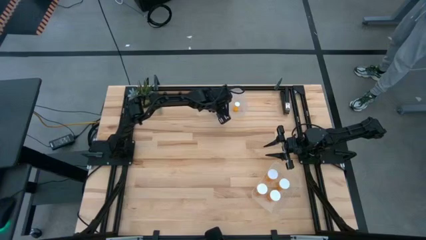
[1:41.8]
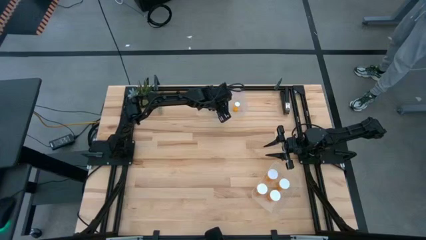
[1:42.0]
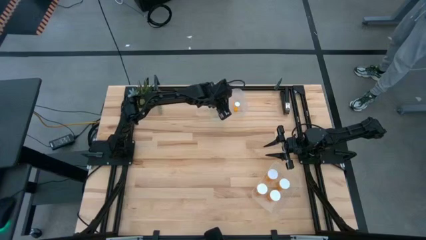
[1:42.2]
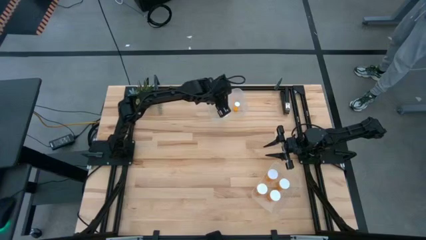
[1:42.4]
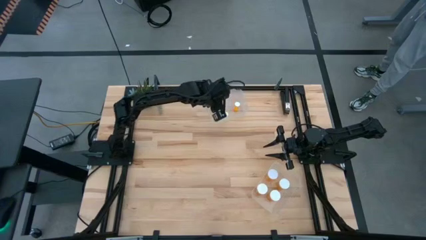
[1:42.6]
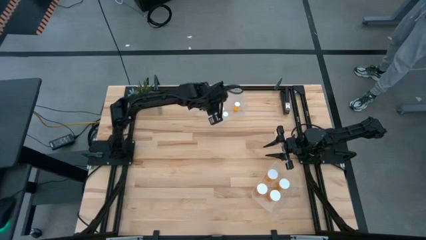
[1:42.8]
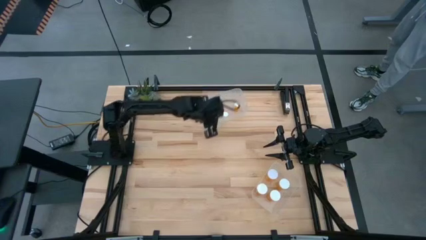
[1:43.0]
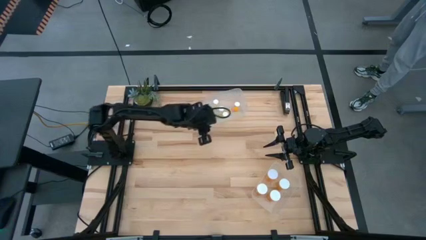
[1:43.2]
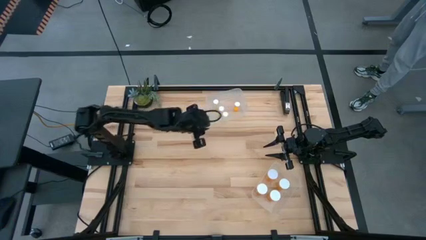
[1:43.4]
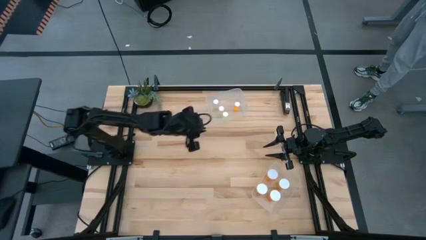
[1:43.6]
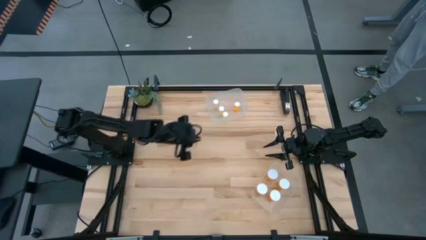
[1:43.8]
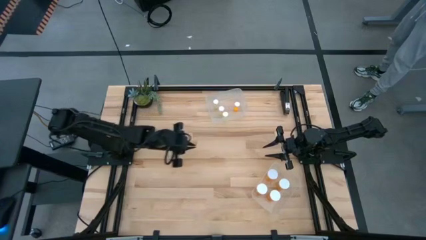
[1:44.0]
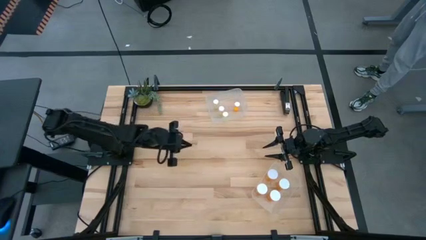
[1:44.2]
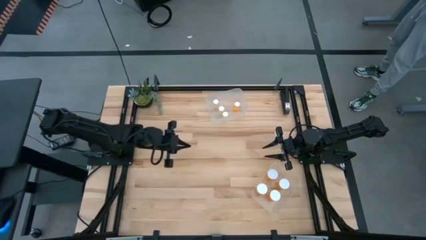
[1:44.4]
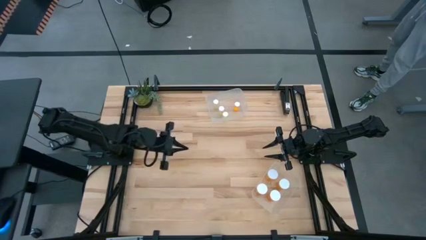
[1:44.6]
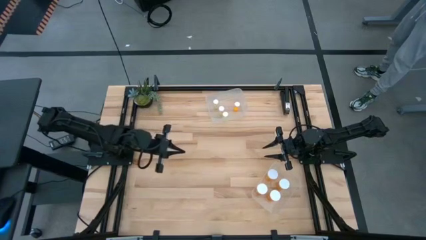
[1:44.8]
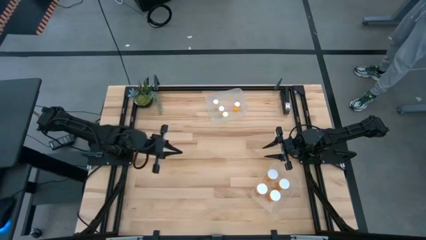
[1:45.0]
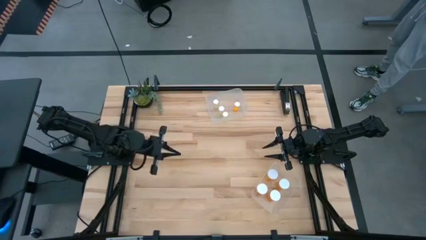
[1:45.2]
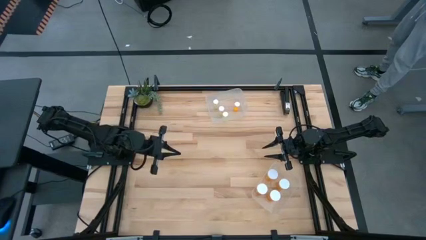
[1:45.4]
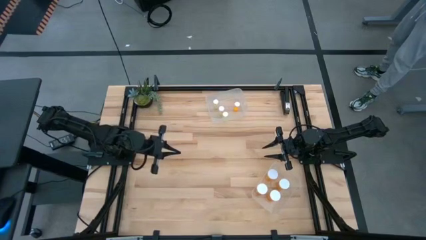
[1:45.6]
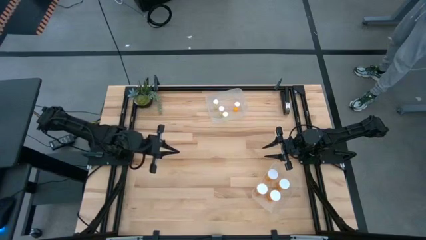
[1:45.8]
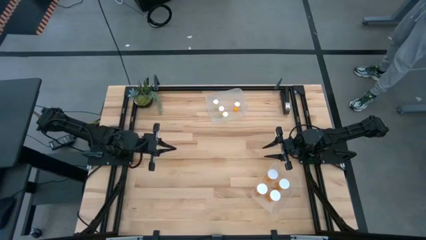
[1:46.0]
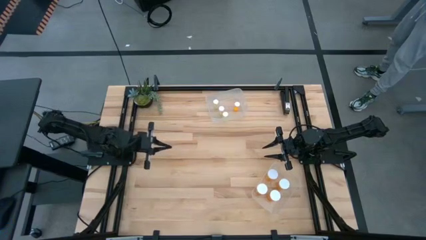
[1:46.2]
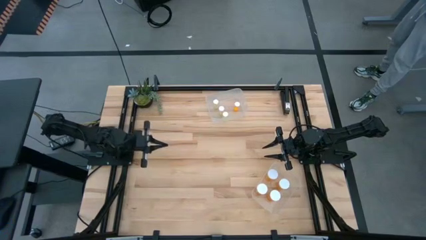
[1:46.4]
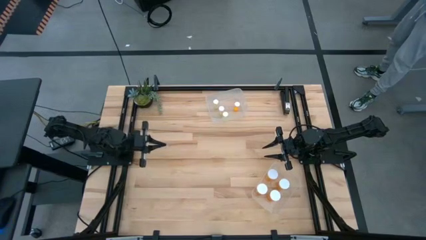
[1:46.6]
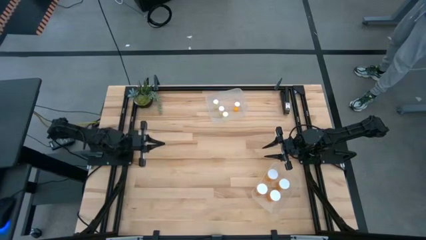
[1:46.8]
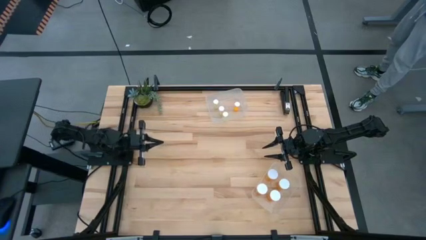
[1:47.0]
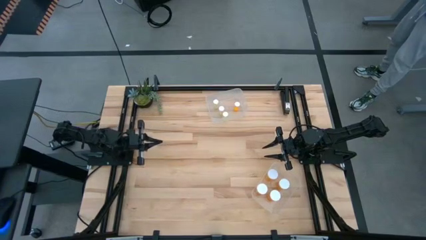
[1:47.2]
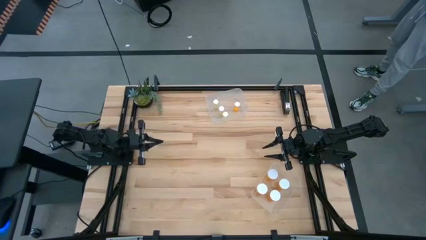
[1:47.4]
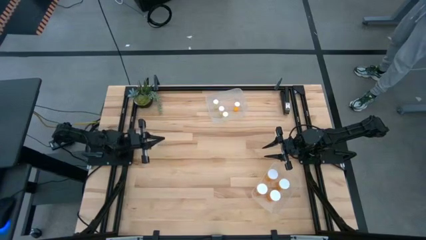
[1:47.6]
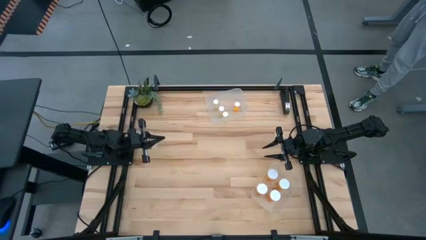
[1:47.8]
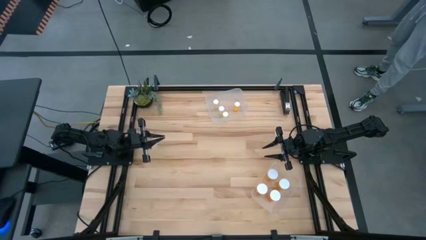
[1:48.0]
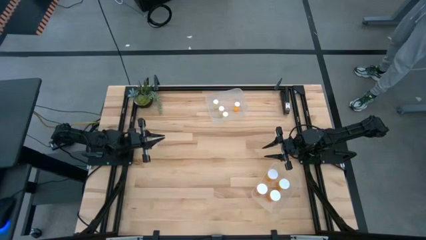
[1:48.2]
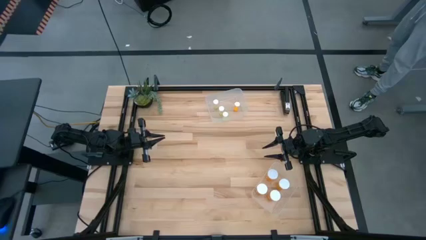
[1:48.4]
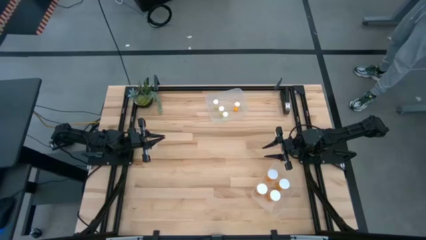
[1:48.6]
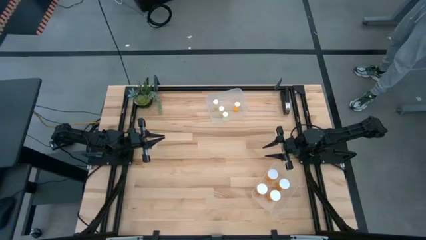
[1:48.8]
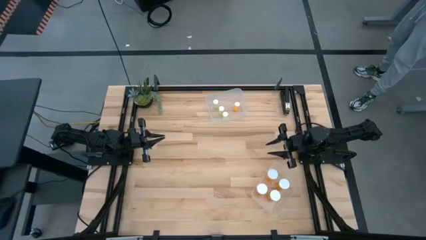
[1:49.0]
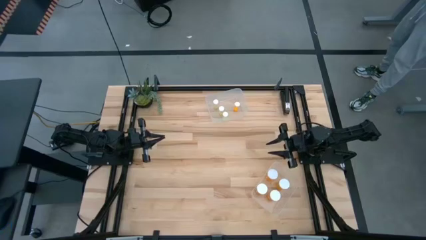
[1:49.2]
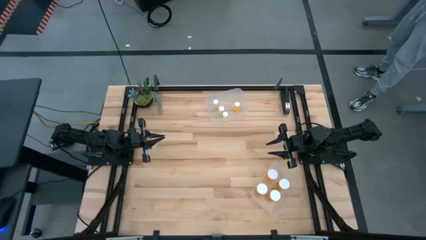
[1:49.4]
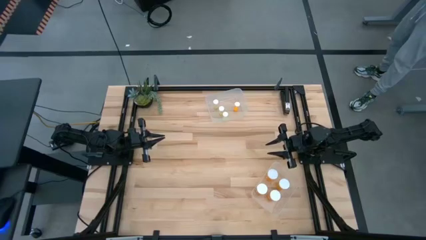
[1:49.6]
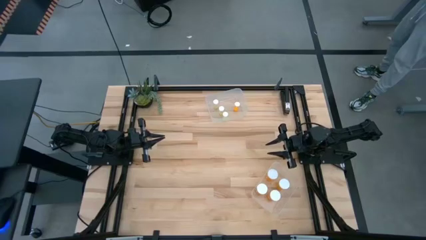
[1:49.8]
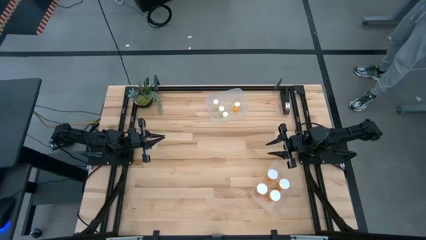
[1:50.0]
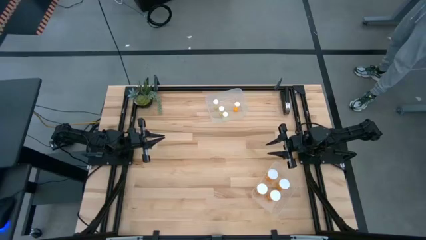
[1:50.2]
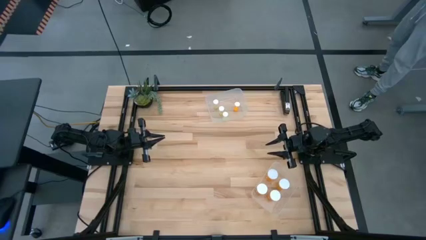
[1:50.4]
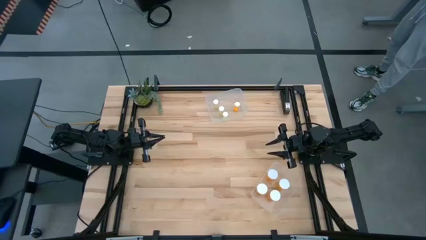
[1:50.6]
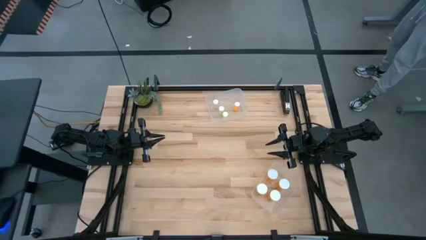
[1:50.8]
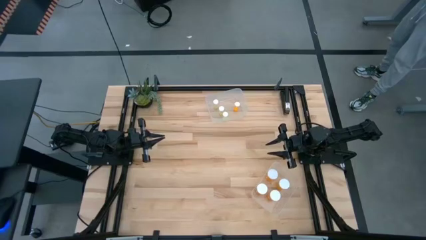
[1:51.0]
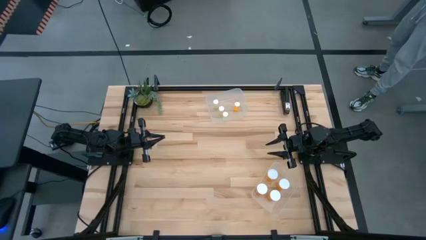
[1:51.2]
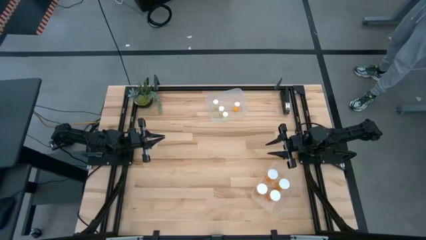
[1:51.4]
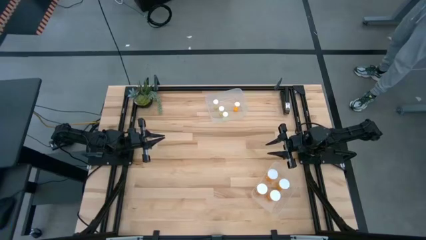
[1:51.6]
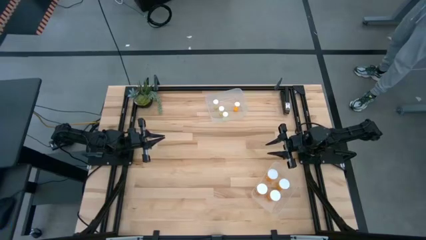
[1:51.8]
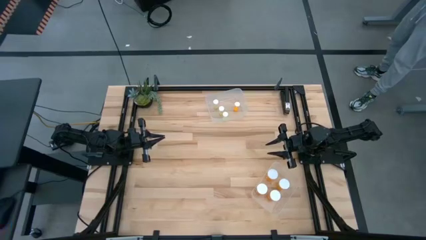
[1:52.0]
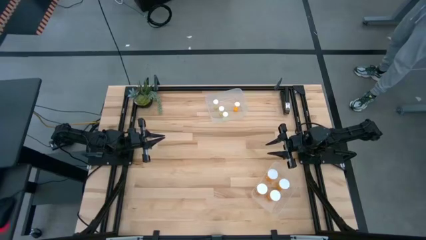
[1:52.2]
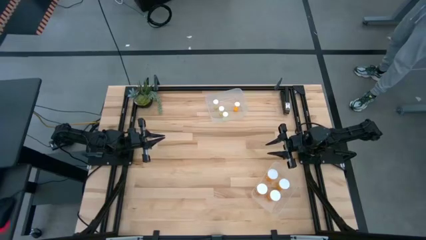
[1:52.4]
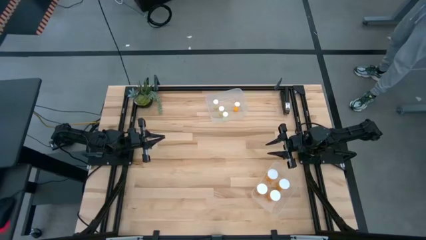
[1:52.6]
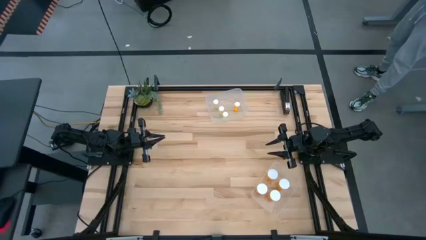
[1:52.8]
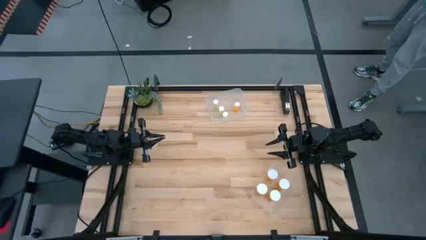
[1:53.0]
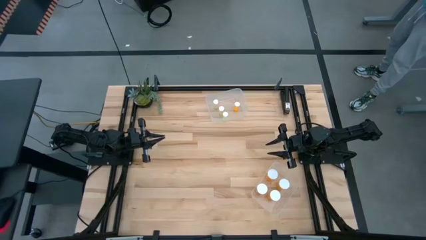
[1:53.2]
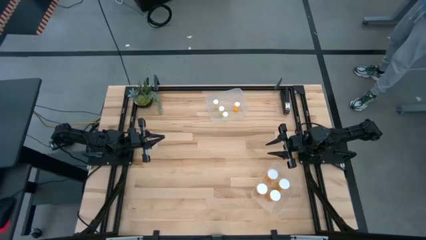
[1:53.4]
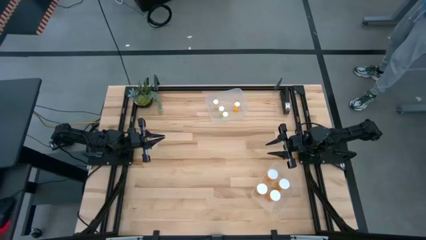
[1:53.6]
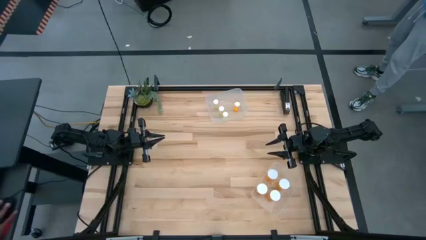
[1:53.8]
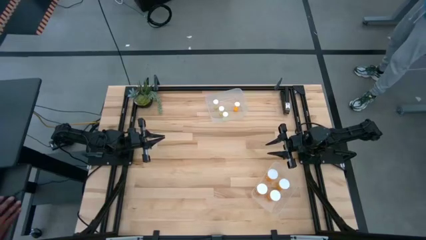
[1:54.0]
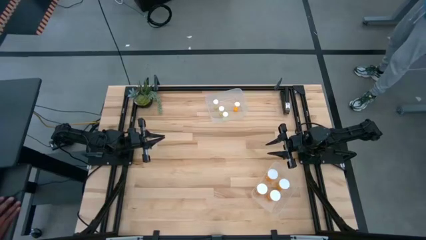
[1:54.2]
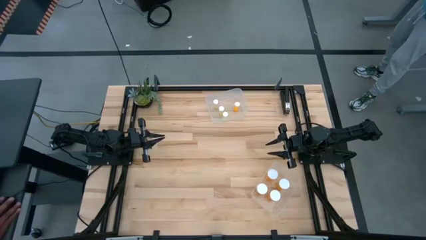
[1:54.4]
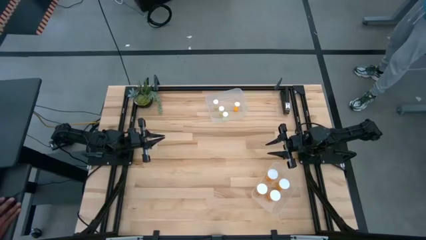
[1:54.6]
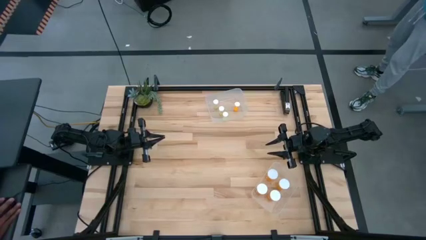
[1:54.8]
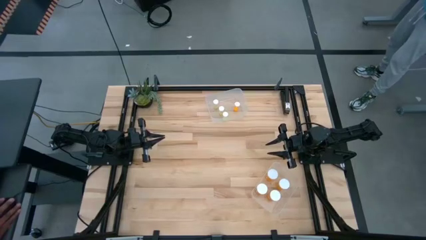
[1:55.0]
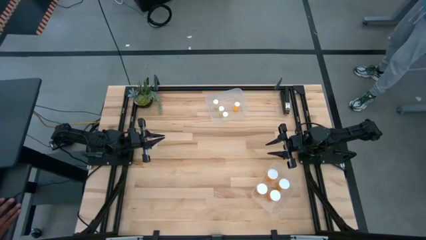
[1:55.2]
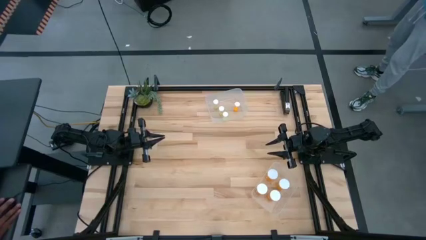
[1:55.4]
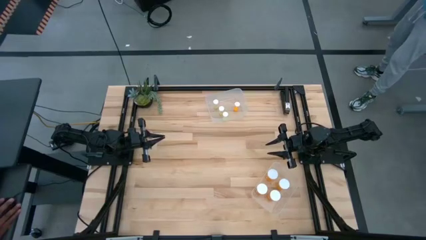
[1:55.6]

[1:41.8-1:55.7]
Task: Pick and place medicine bottles into bin by pill shape (circle, oval)
Return to Home Position
